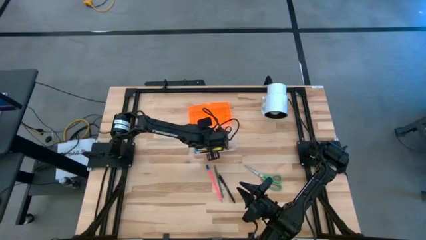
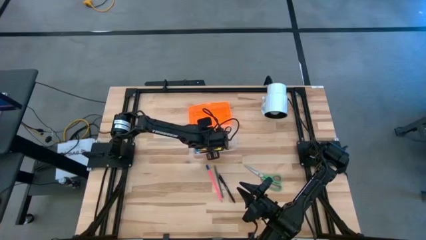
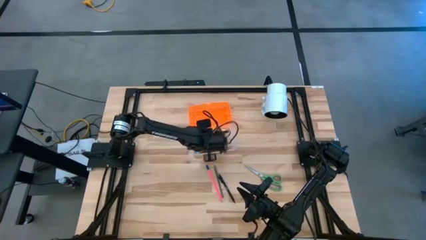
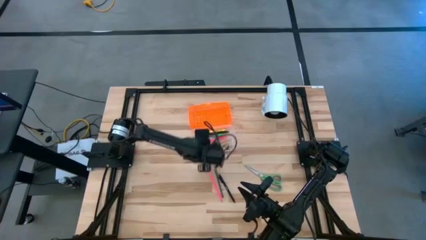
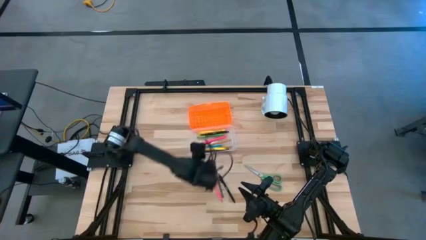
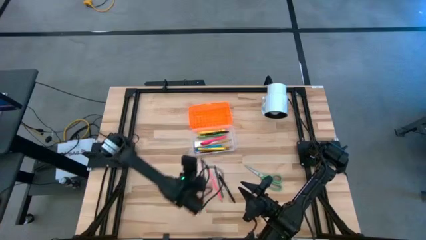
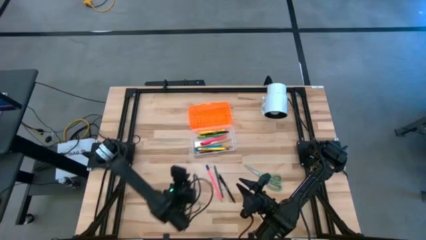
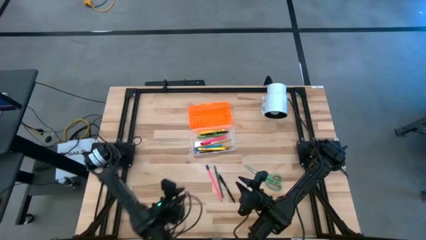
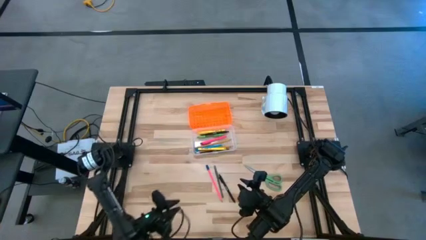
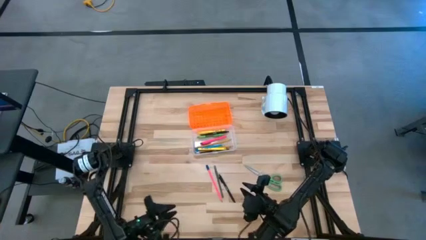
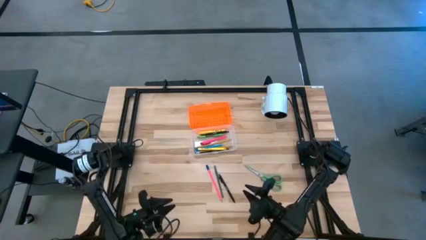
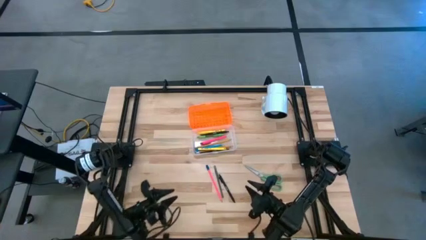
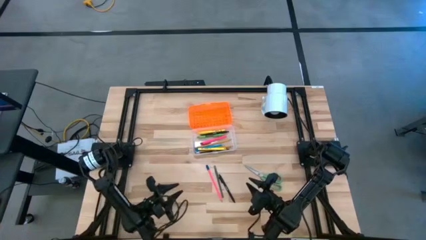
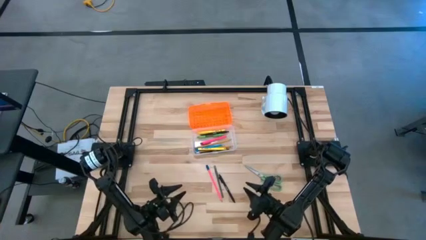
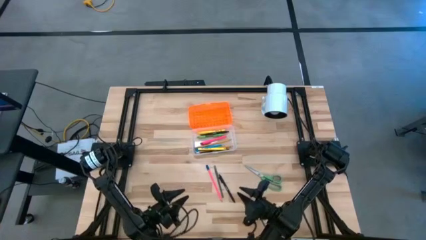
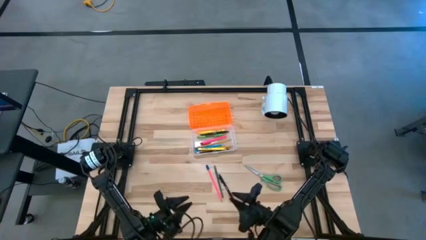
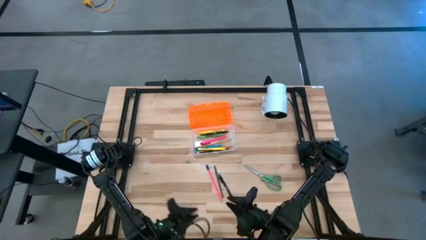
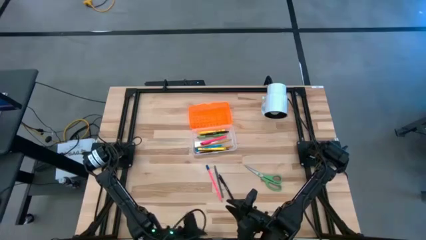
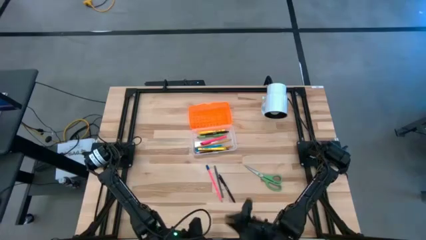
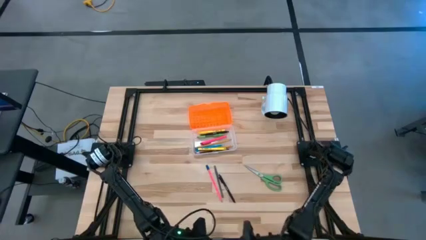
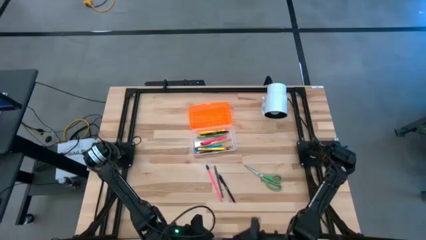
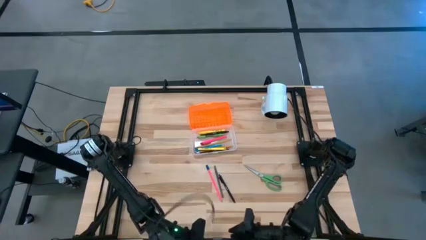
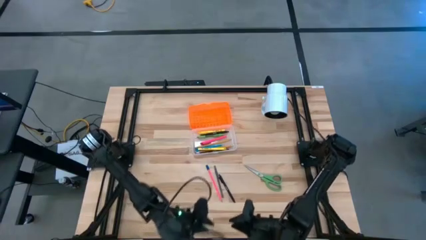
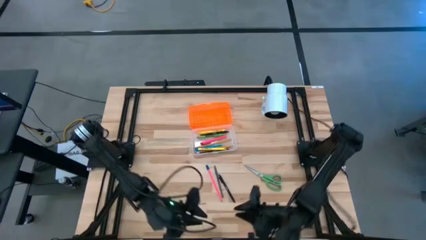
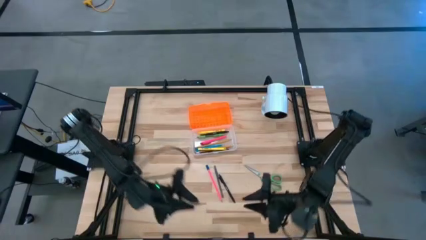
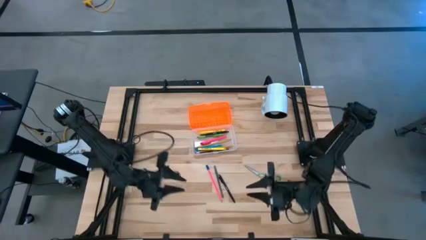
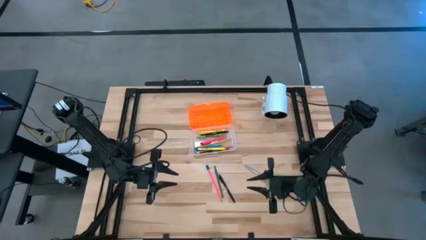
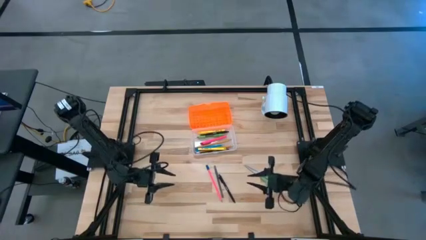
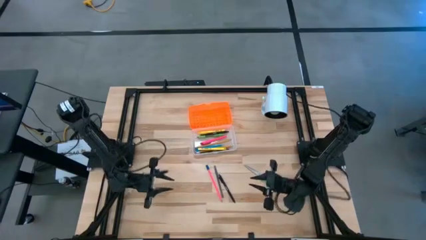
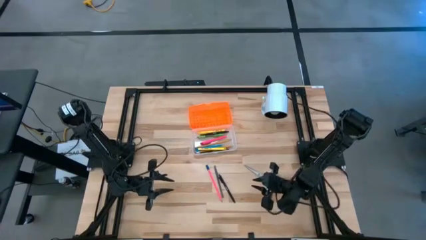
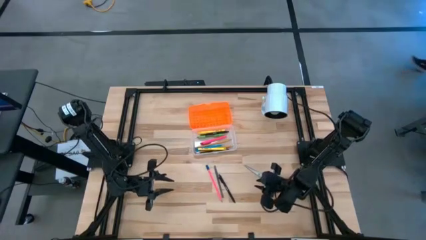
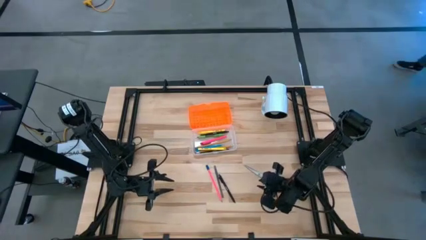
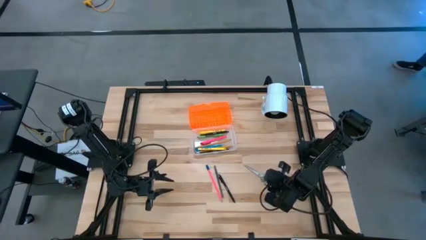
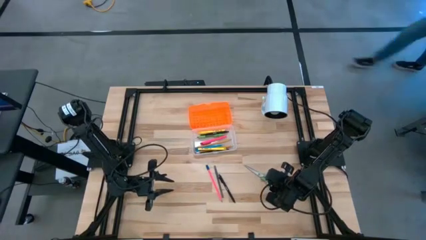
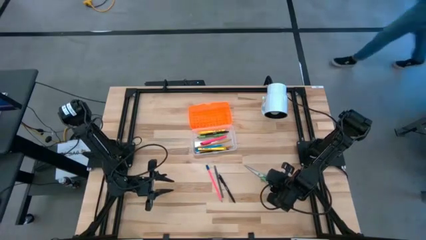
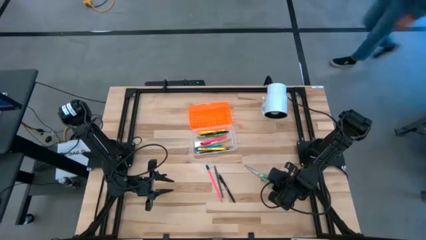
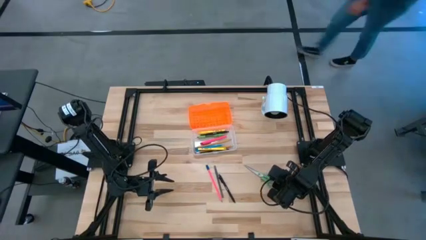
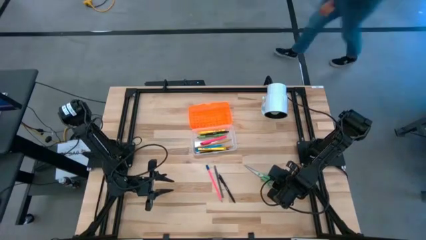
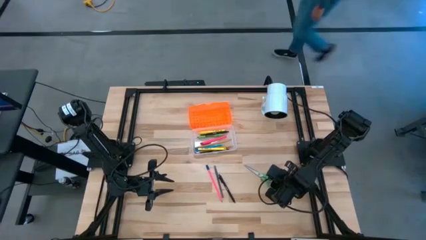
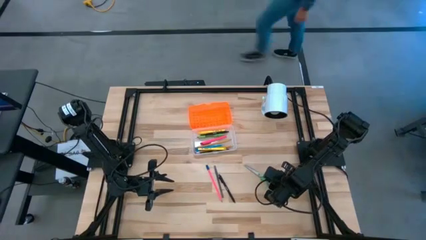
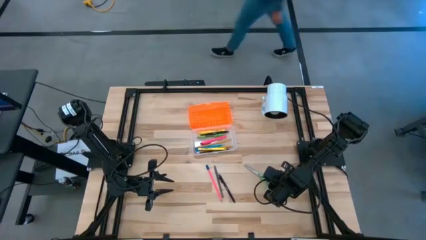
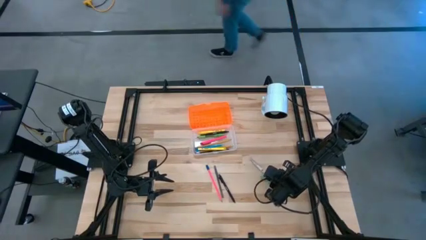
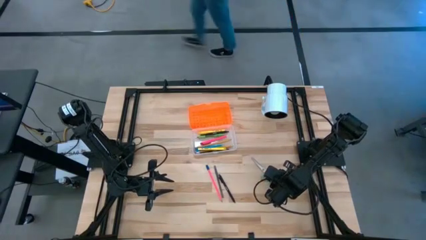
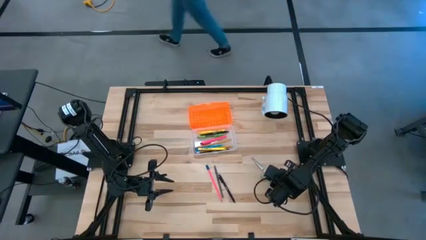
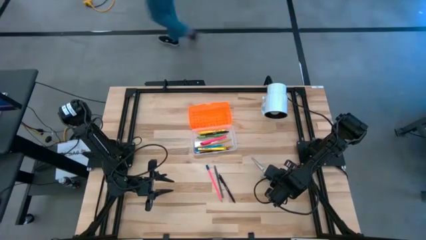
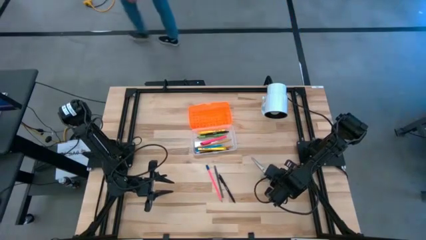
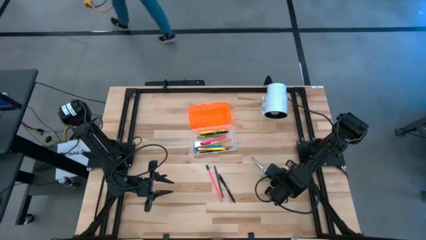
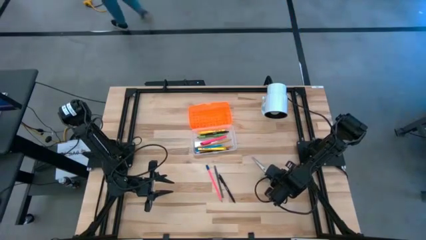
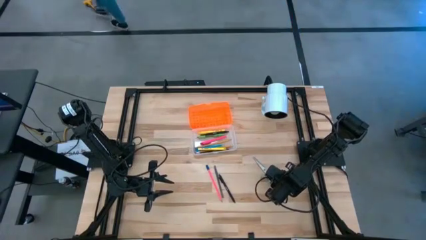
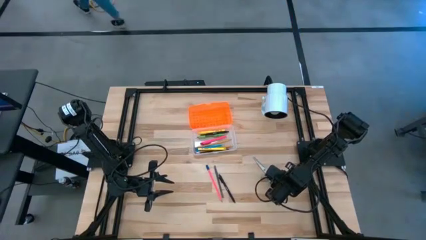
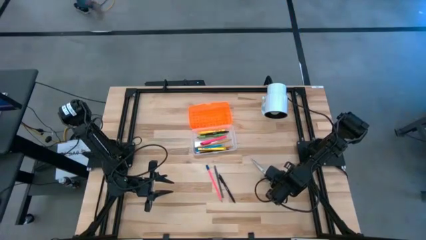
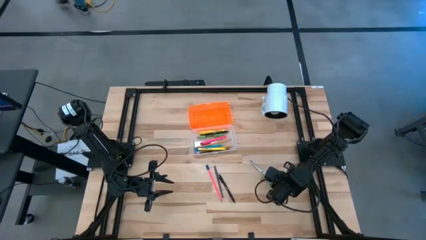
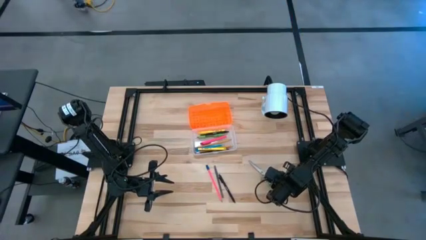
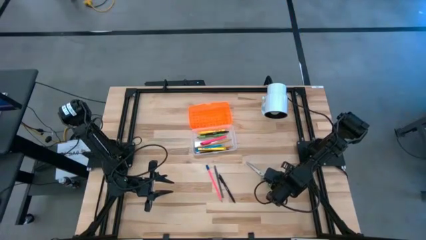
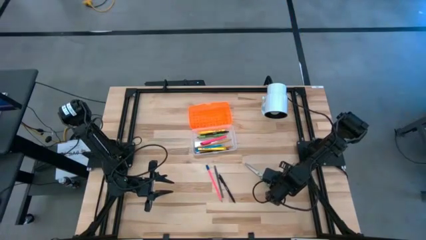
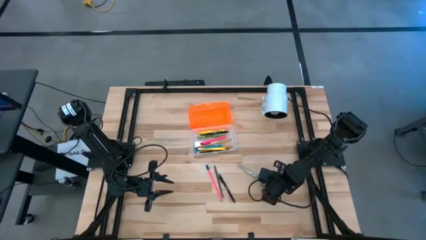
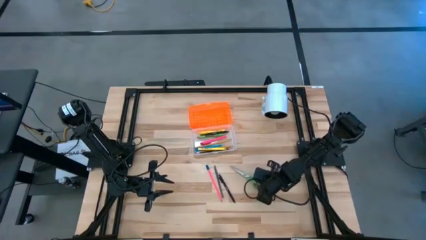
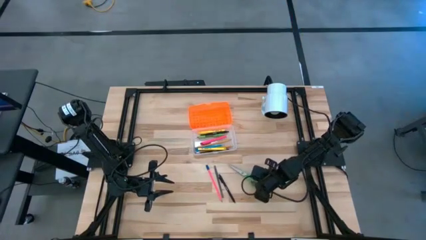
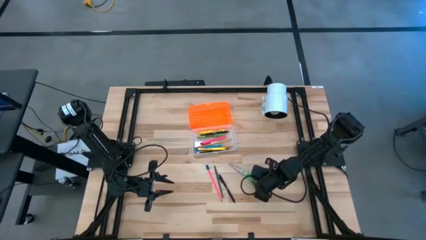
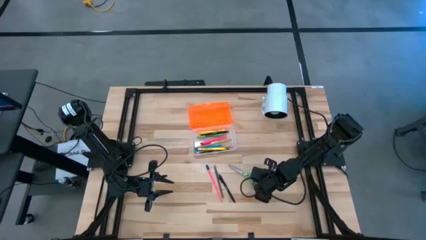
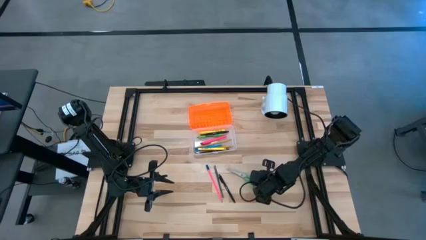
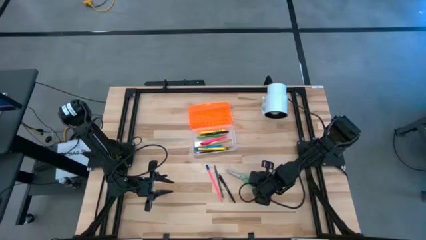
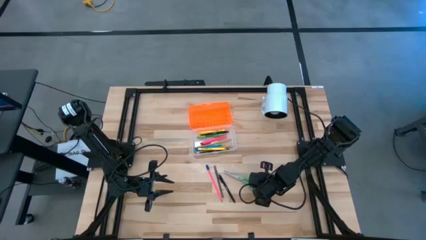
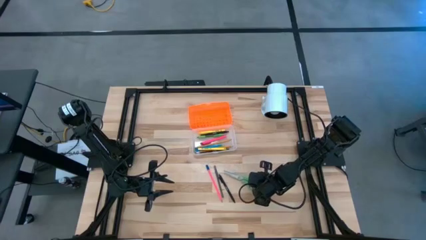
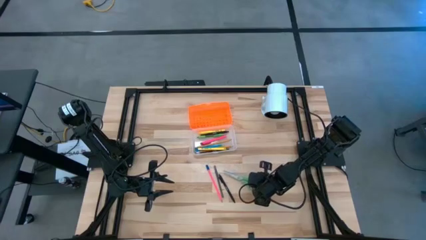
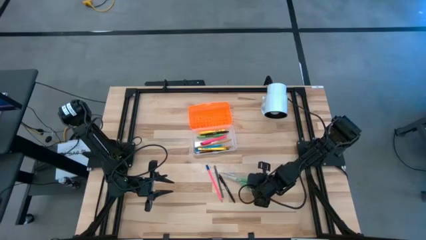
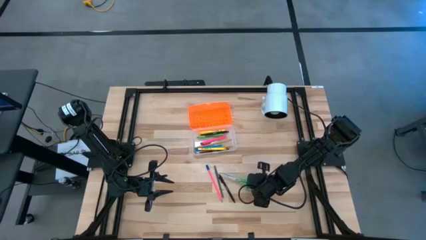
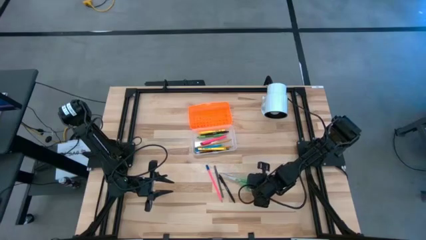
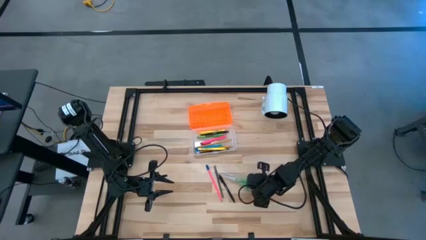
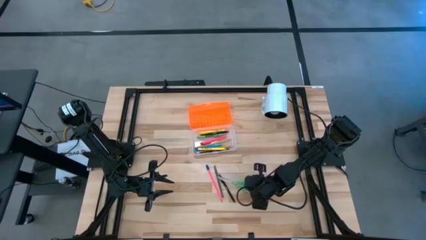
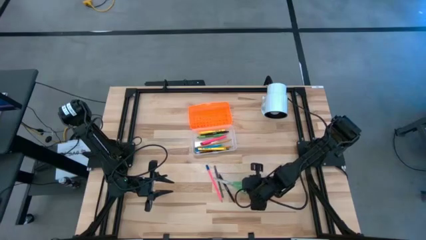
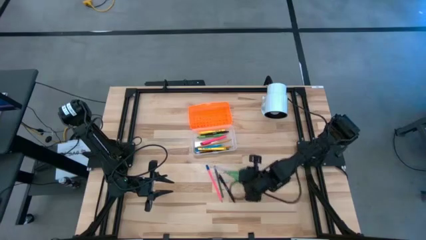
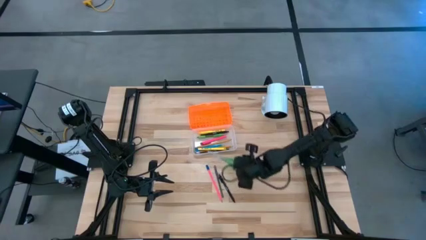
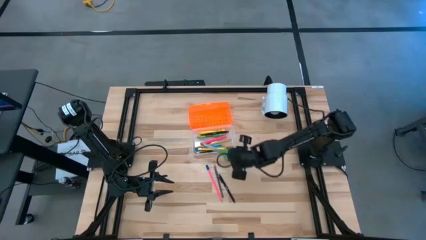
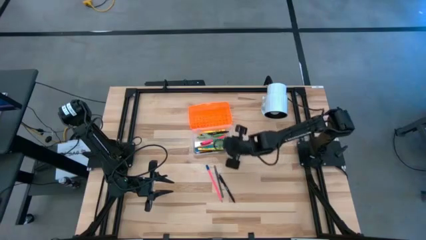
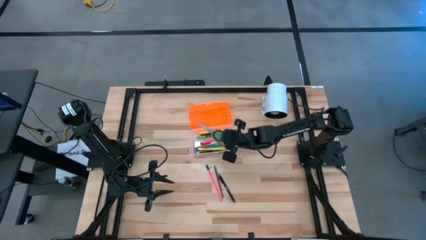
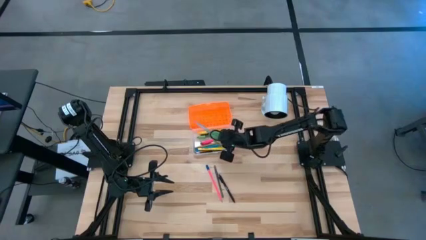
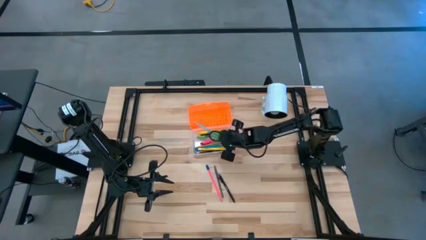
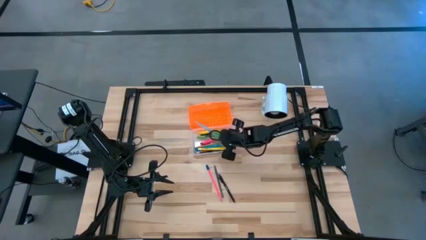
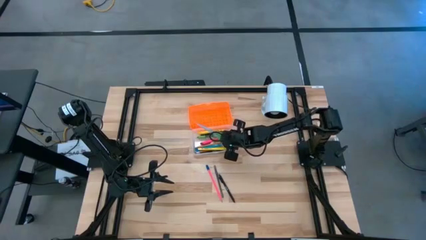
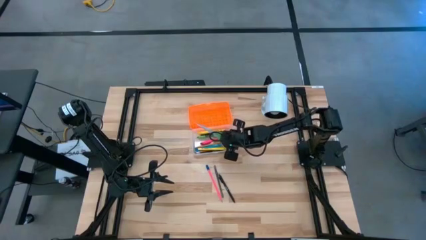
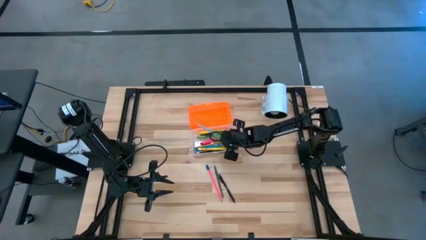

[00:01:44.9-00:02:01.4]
Task: Pick & place school supplies into a supply box
Put the green scissors into the supply box
